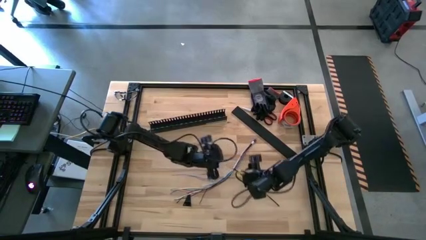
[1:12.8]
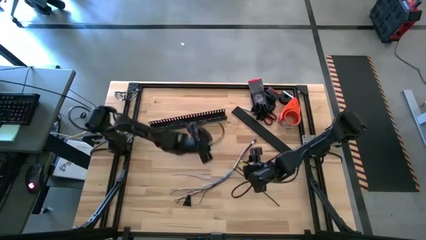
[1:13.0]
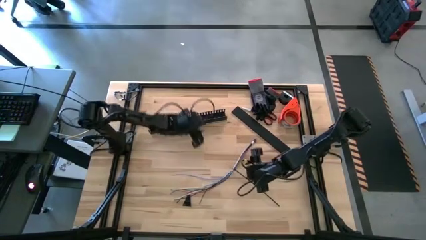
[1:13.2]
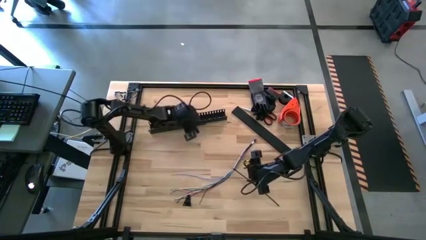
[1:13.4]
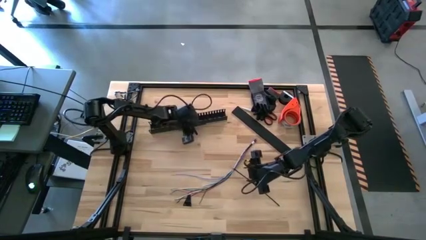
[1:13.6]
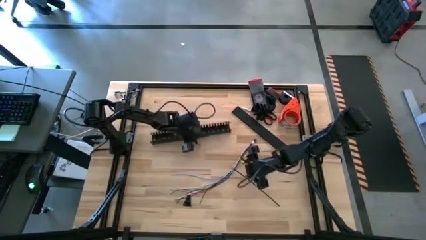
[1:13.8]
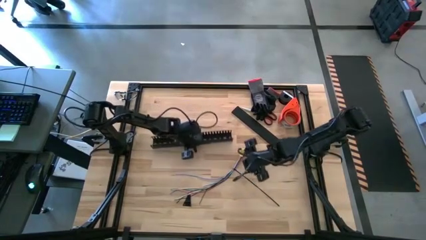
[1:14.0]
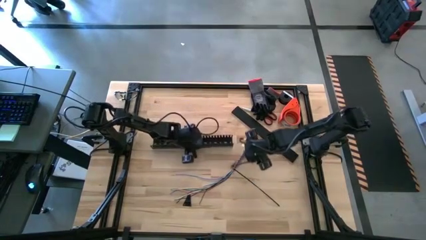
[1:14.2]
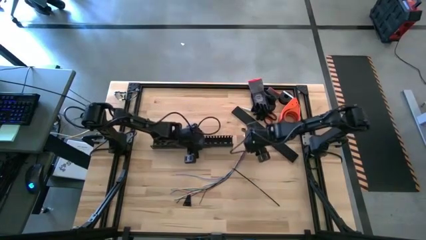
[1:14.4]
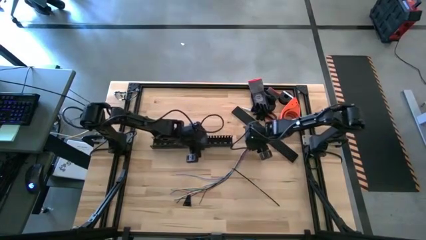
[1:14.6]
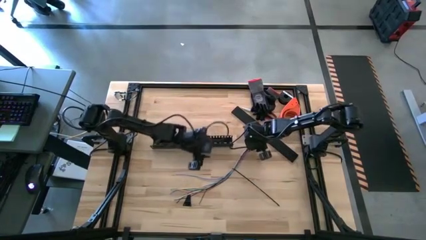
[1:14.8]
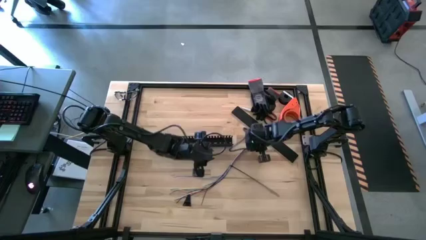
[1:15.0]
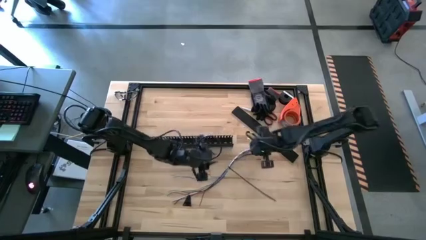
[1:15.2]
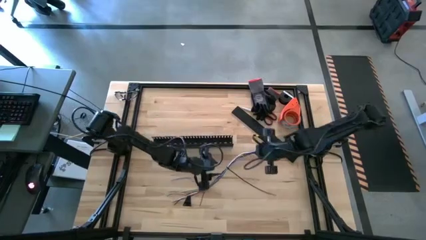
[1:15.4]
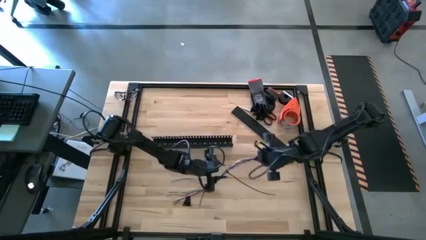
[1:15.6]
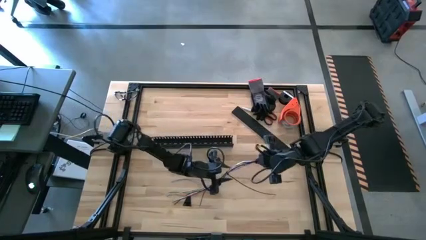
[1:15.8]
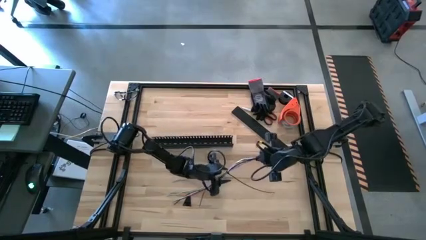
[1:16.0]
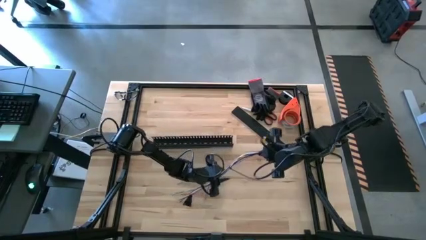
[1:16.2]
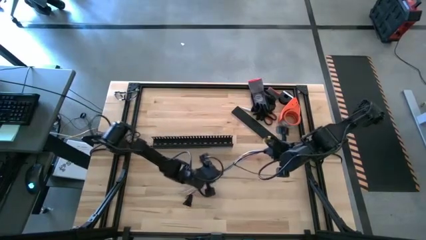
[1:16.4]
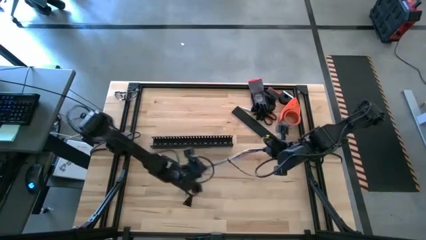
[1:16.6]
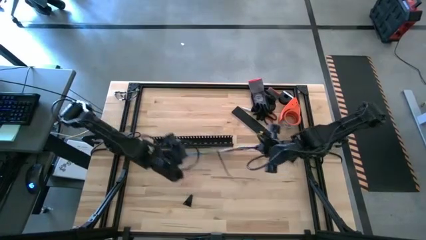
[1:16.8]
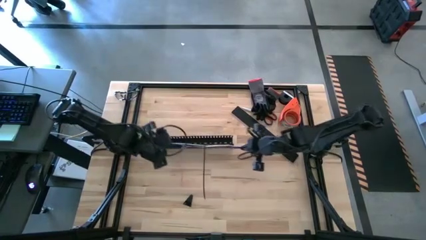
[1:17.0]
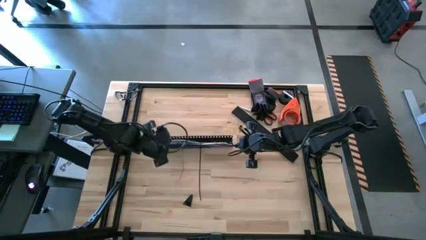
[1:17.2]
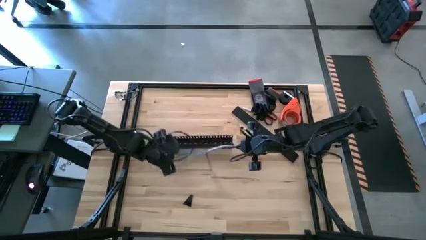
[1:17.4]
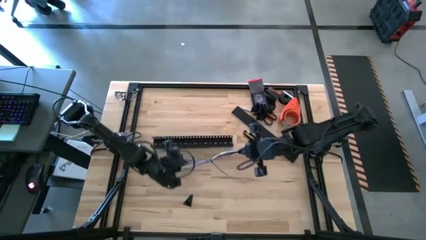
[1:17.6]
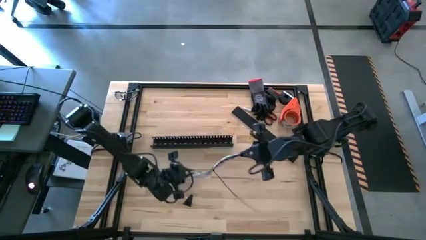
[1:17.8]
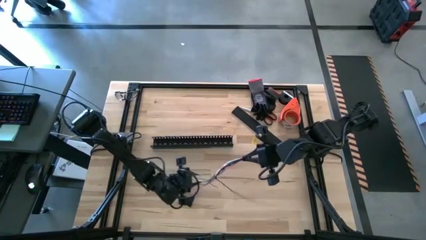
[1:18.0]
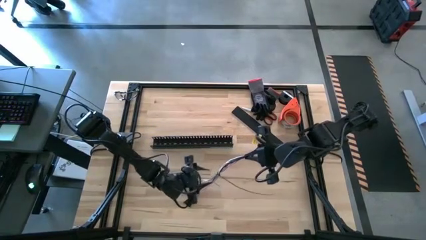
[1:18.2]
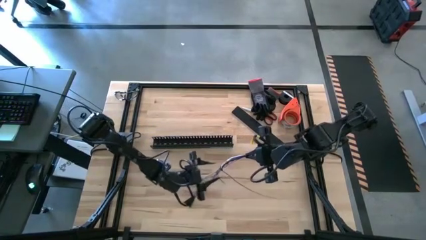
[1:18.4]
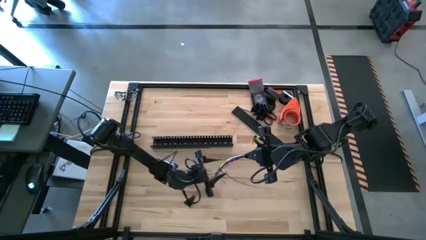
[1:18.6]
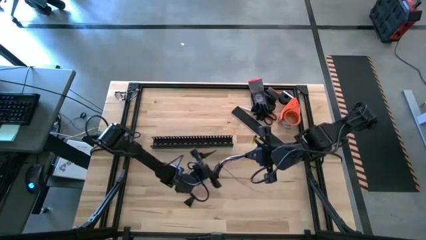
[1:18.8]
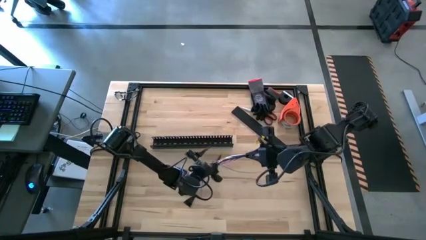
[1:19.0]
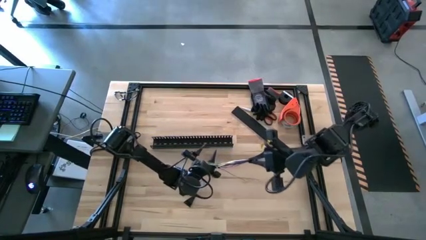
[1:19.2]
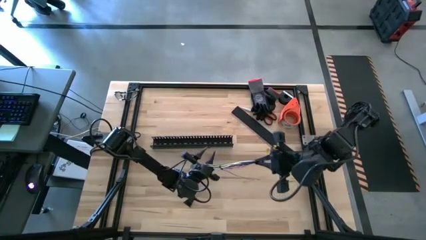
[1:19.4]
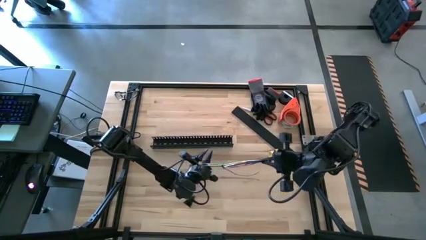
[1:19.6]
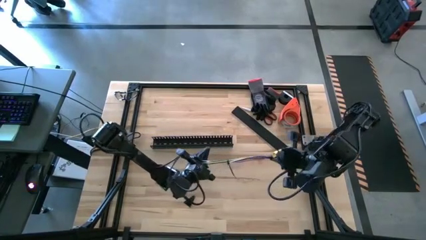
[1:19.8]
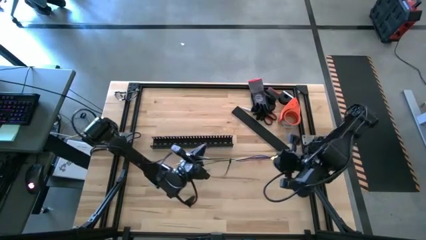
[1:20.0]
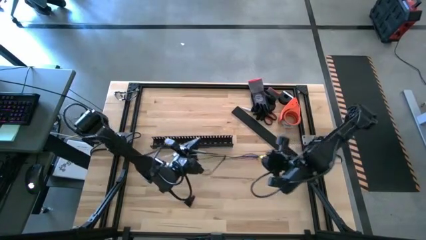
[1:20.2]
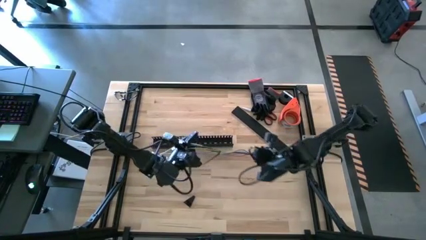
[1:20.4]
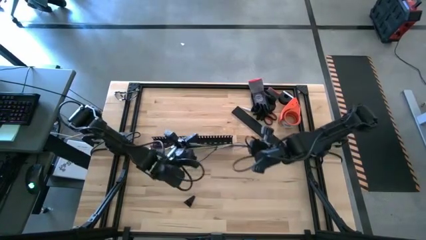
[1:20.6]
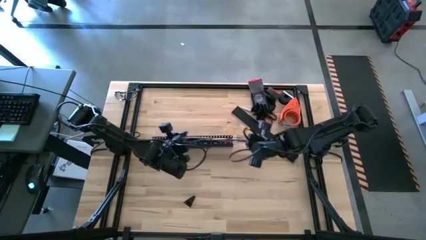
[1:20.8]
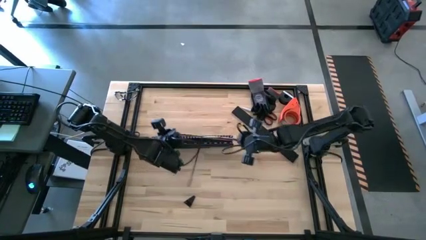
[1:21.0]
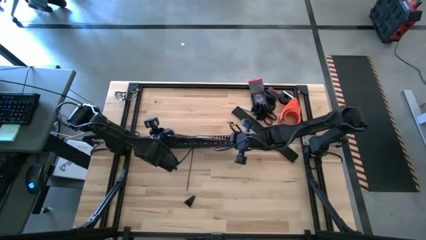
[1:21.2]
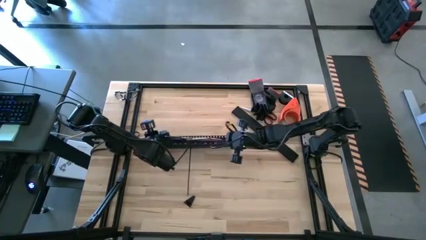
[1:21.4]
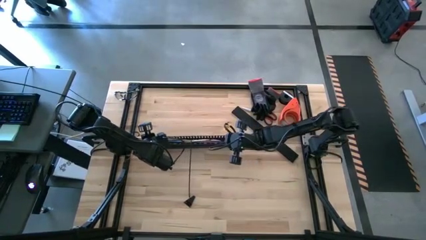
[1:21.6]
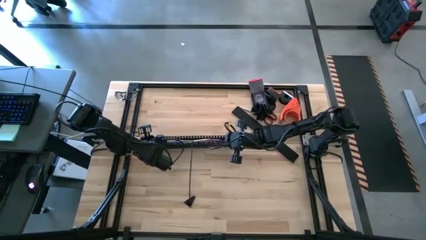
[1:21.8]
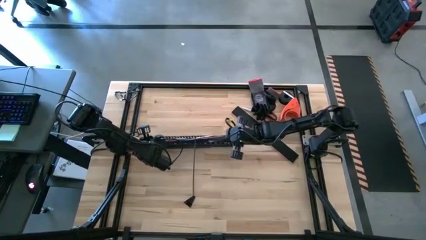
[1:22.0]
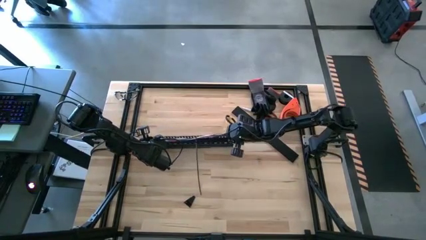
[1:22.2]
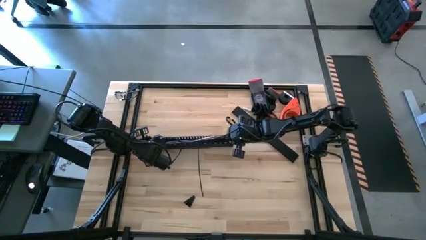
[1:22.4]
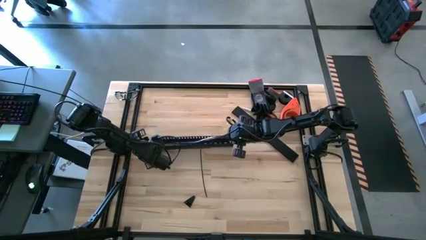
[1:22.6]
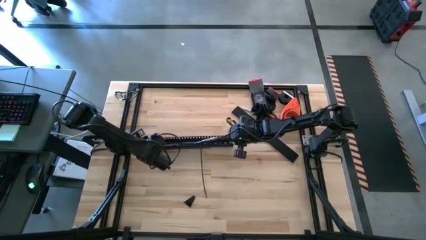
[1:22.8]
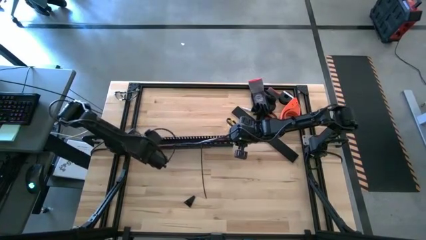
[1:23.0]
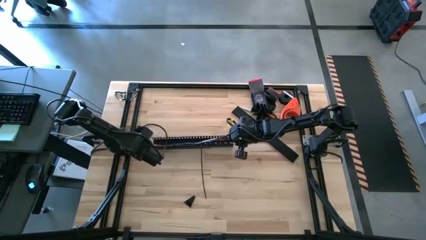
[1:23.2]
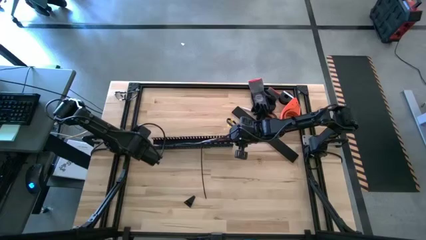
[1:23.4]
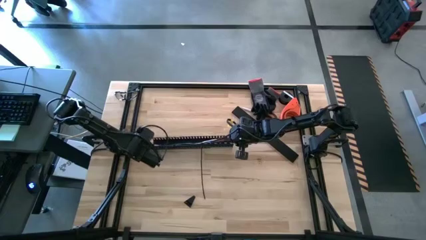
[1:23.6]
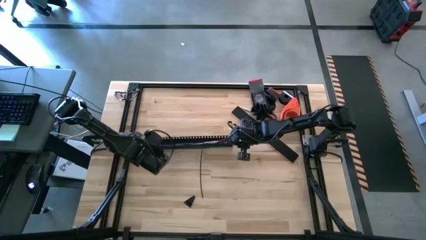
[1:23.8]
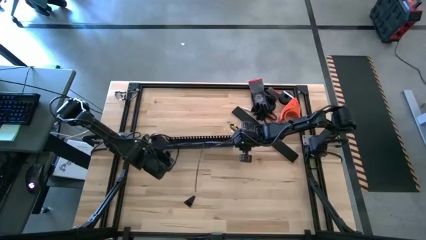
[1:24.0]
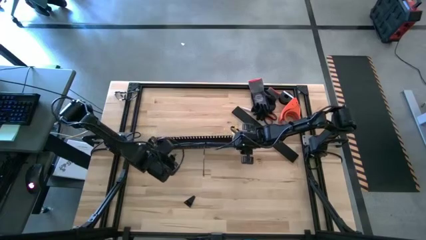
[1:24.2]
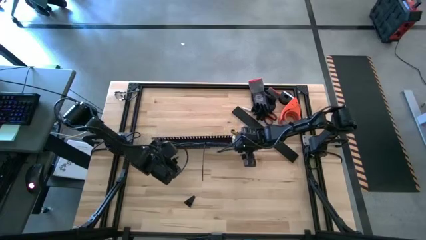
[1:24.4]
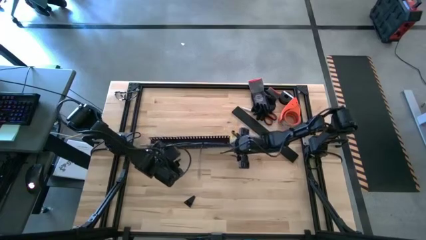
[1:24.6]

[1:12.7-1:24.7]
Task: Ziptie cables
Put the colored ziptied cables into the cable duct

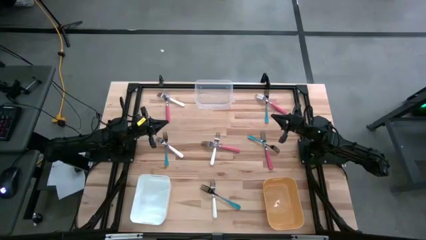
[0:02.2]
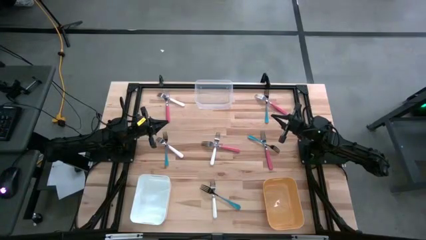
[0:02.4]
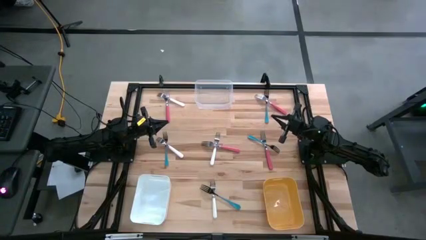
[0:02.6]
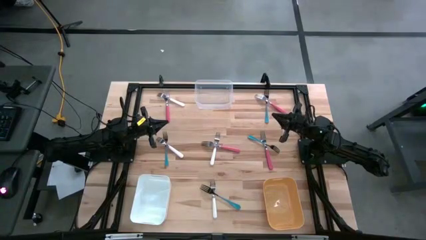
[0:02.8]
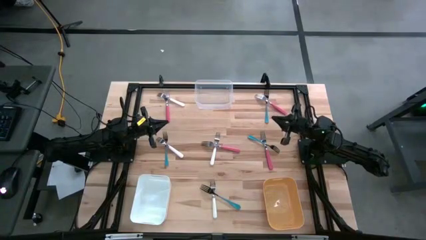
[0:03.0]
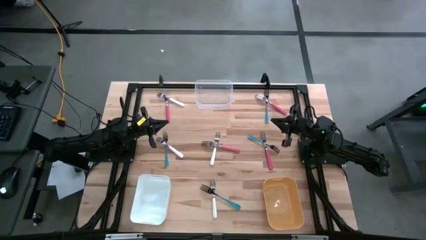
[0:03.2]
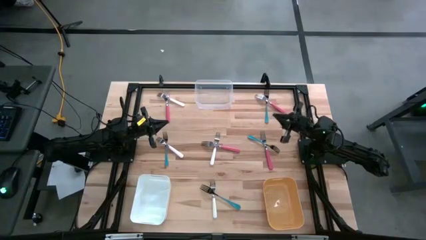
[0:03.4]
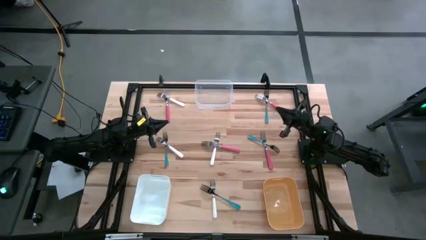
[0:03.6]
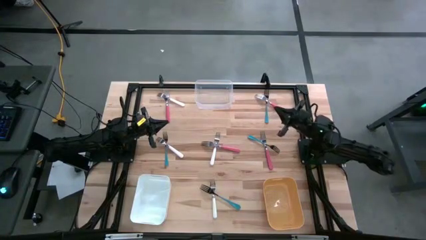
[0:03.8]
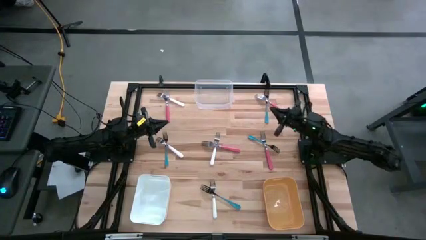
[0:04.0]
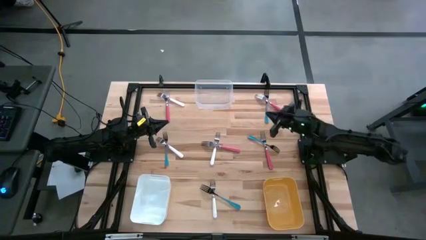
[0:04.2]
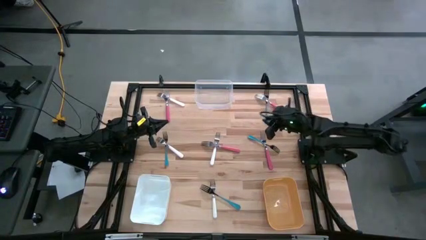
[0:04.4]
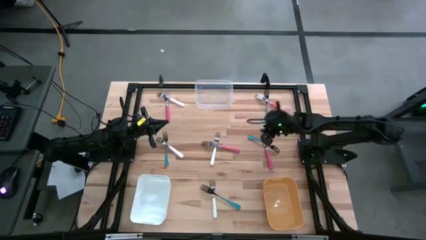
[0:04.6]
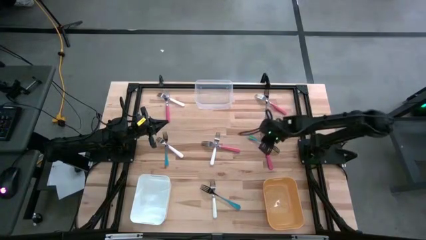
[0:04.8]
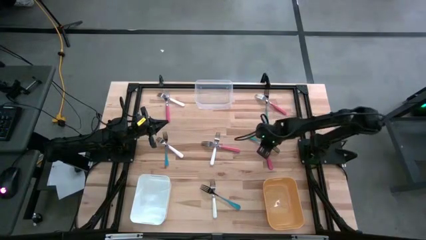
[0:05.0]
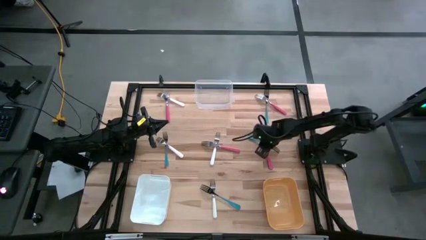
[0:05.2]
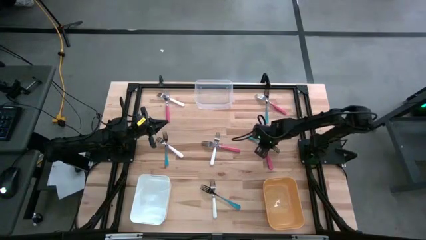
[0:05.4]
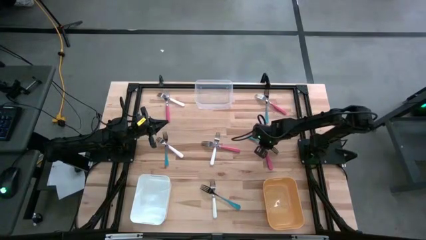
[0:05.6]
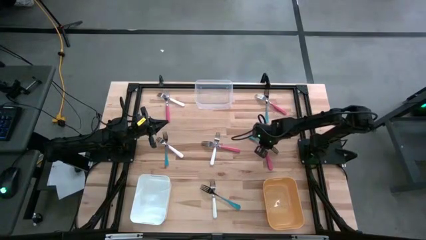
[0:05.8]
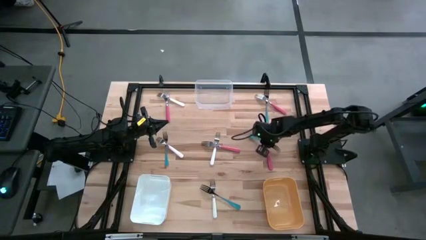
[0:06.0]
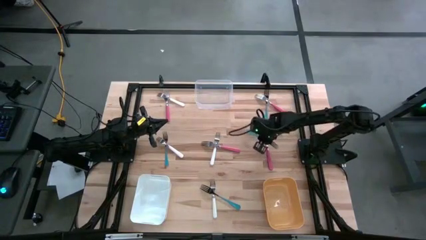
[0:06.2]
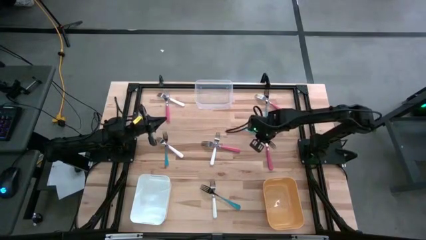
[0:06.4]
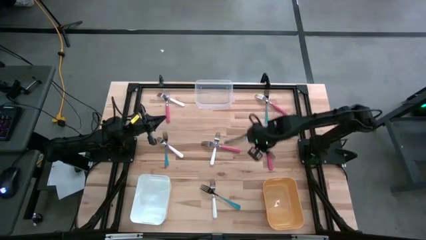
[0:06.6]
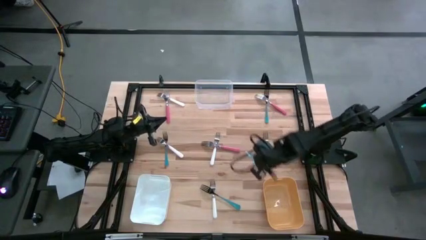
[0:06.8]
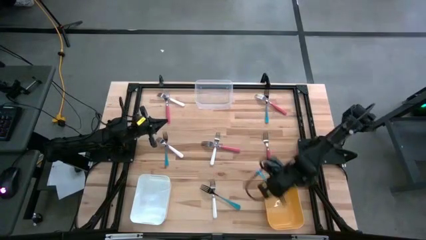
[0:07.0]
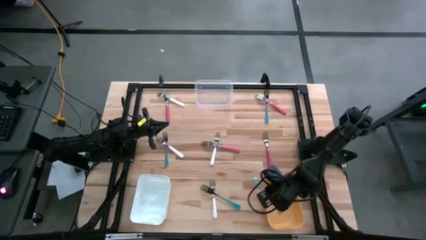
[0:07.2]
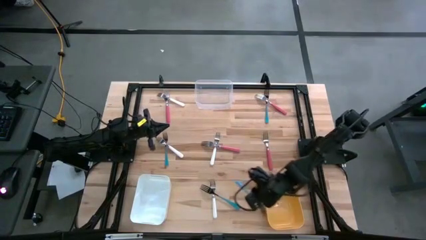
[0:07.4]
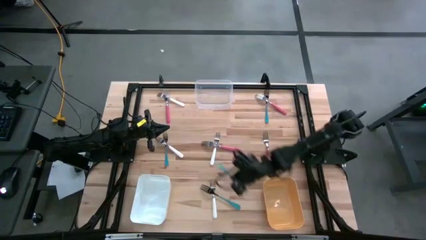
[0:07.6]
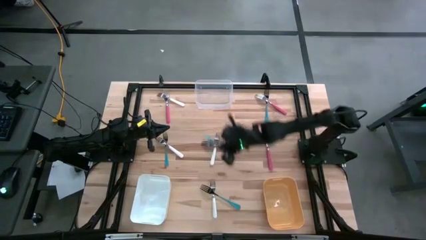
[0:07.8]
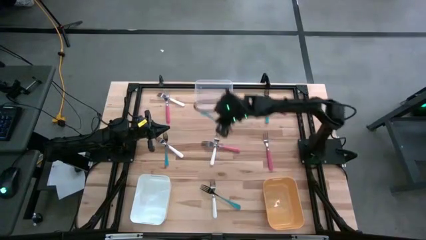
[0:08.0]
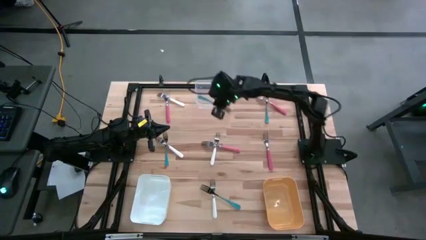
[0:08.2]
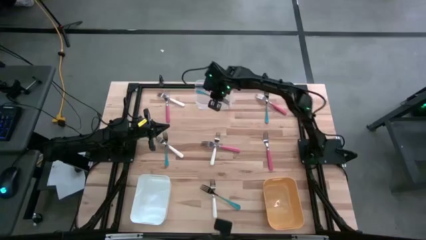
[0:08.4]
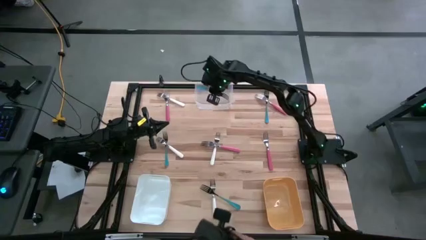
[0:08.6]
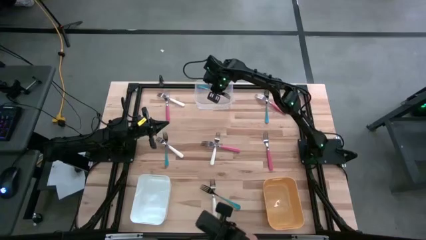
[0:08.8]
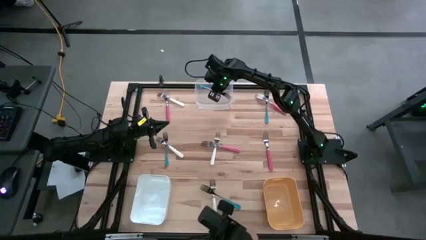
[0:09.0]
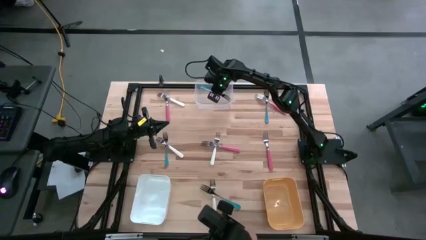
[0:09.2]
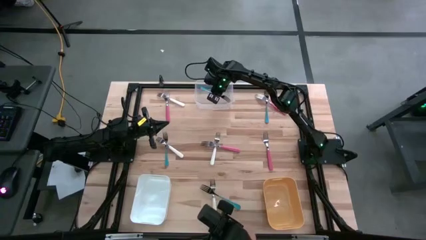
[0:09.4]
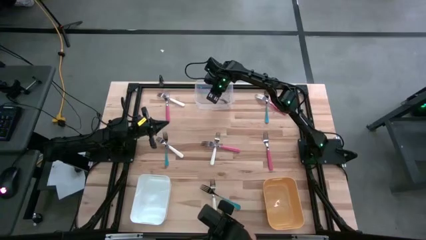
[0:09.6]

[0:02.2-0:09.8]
Task: Sort silverware by color (type)
Put the blue fork into the transparent bin
